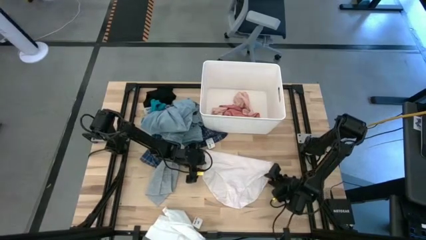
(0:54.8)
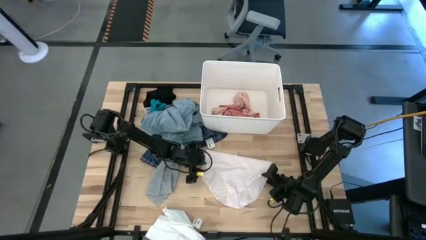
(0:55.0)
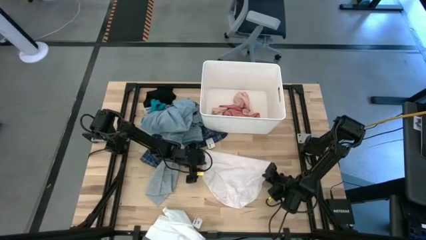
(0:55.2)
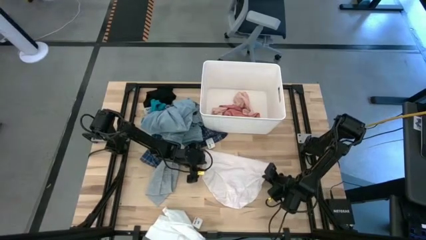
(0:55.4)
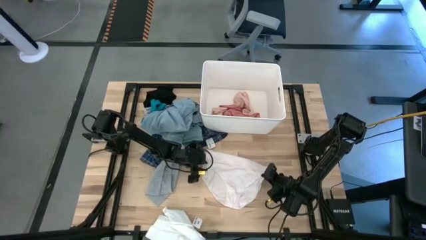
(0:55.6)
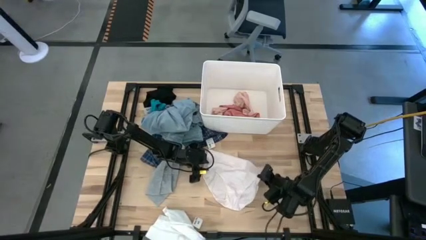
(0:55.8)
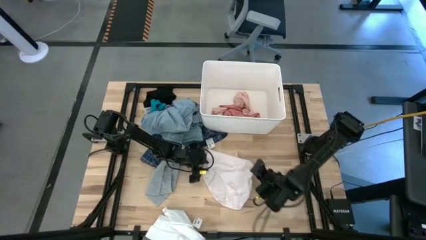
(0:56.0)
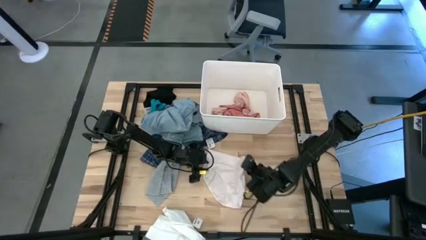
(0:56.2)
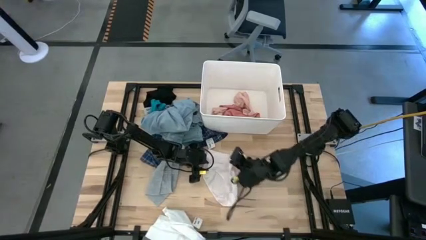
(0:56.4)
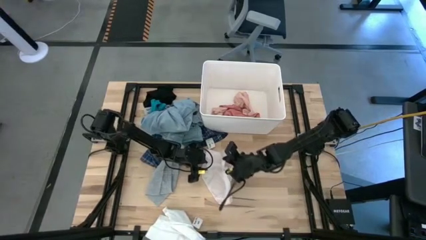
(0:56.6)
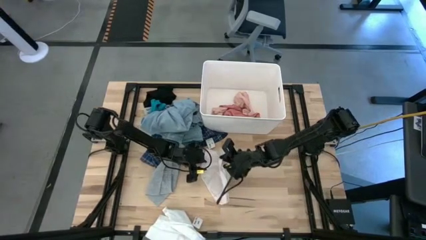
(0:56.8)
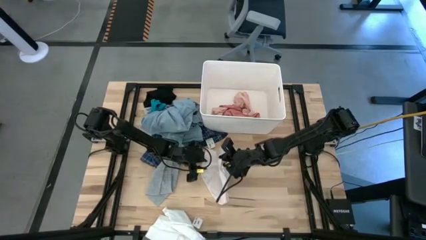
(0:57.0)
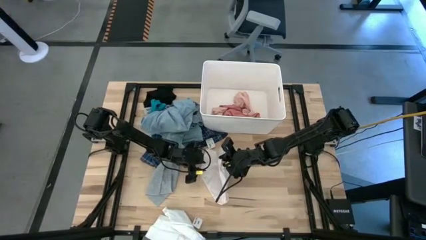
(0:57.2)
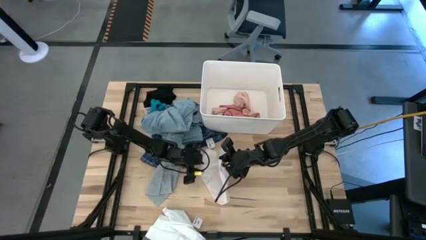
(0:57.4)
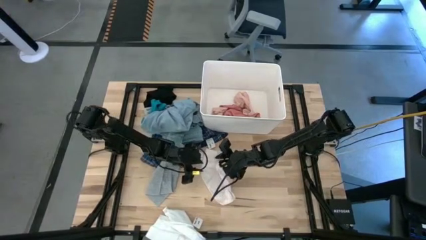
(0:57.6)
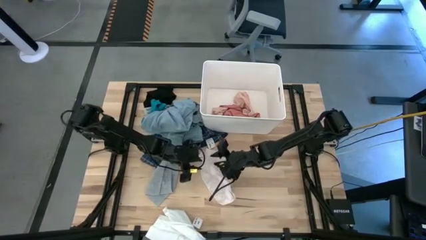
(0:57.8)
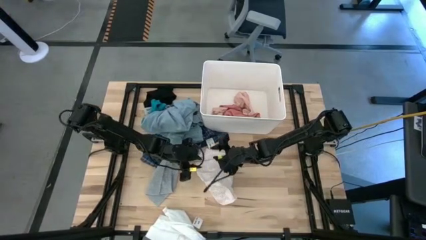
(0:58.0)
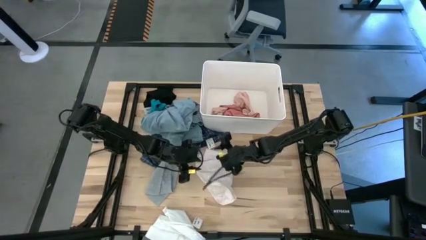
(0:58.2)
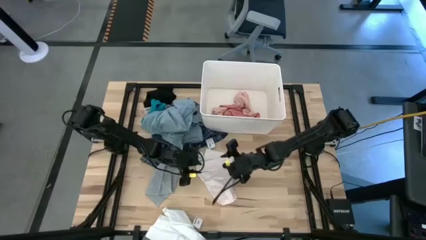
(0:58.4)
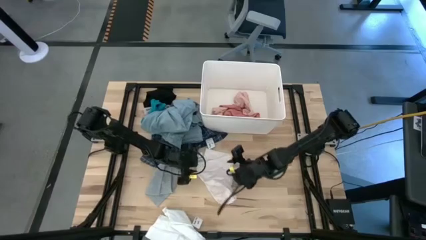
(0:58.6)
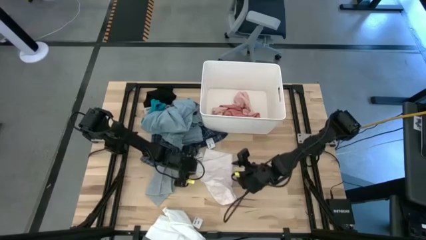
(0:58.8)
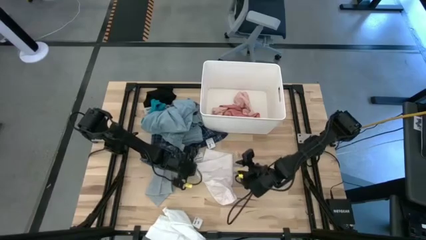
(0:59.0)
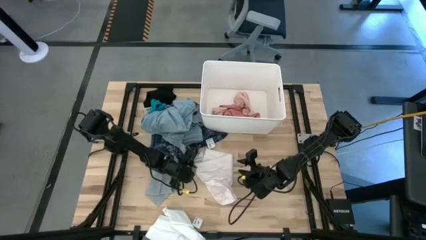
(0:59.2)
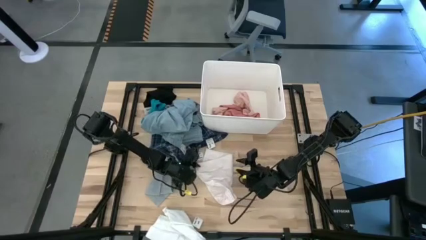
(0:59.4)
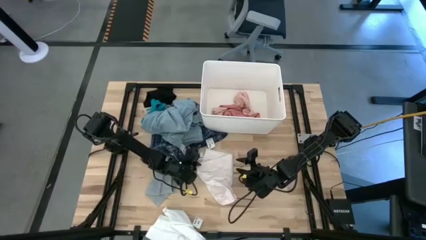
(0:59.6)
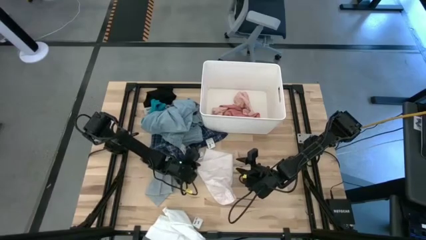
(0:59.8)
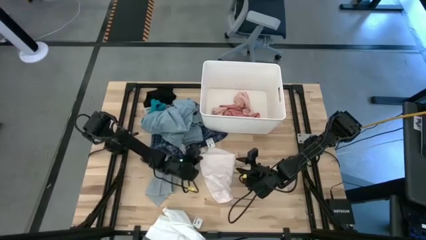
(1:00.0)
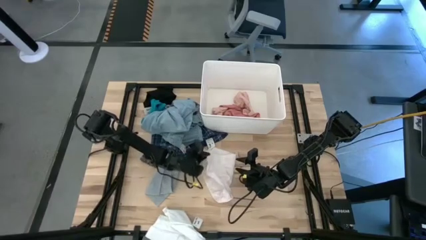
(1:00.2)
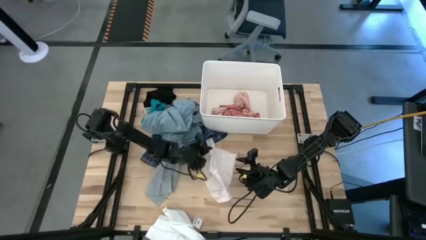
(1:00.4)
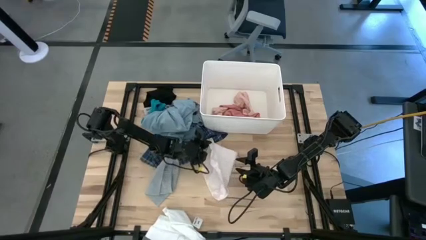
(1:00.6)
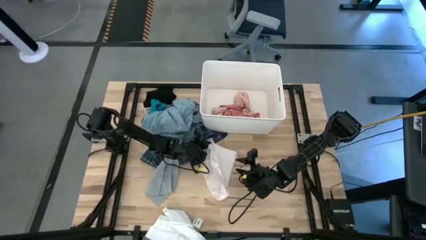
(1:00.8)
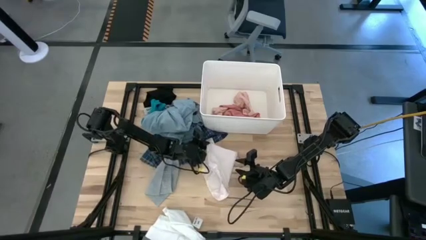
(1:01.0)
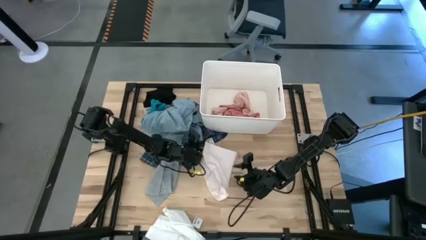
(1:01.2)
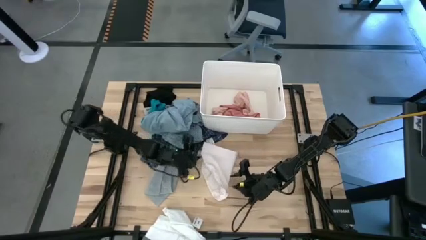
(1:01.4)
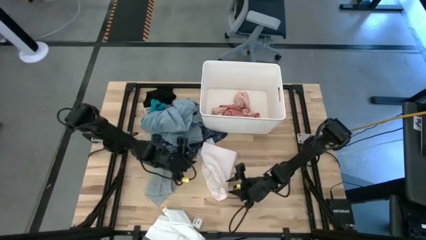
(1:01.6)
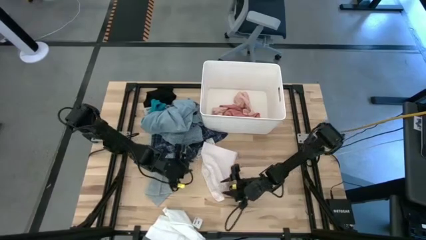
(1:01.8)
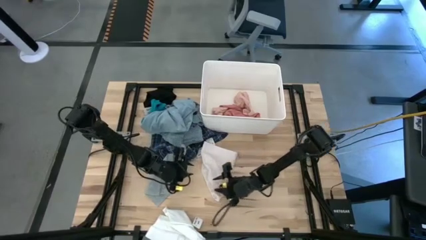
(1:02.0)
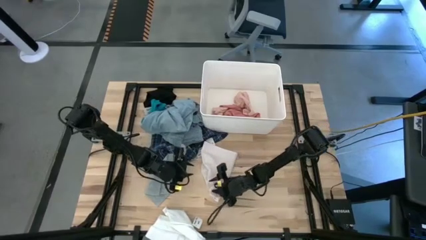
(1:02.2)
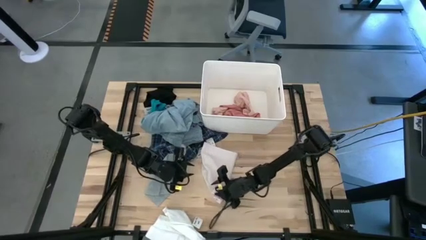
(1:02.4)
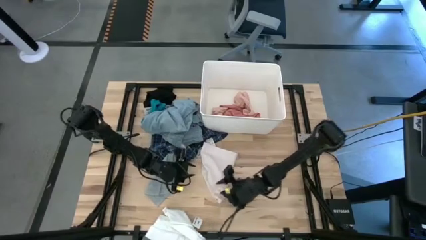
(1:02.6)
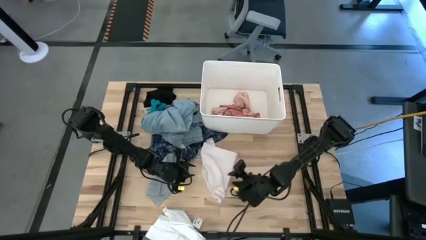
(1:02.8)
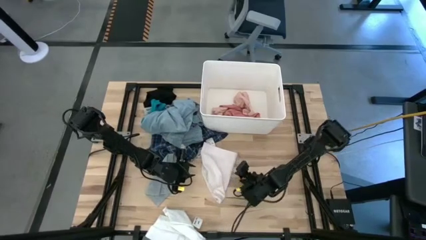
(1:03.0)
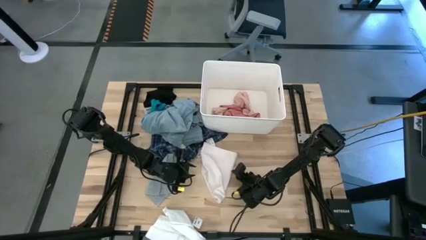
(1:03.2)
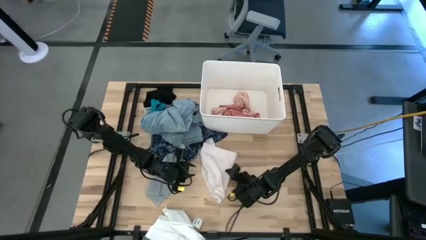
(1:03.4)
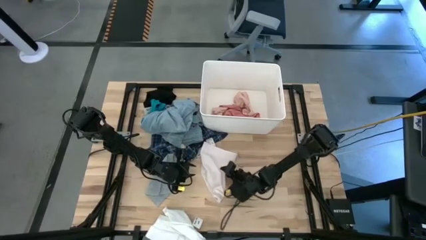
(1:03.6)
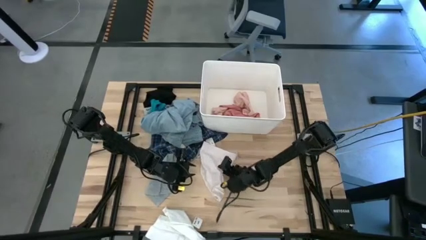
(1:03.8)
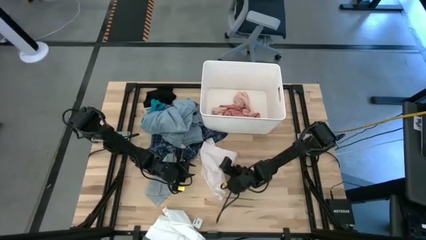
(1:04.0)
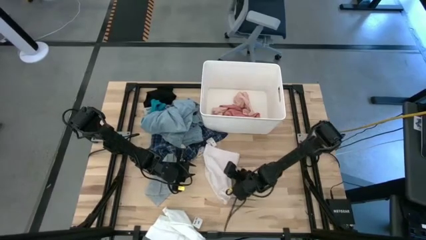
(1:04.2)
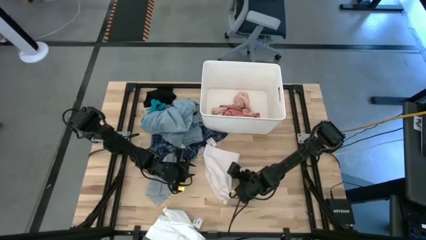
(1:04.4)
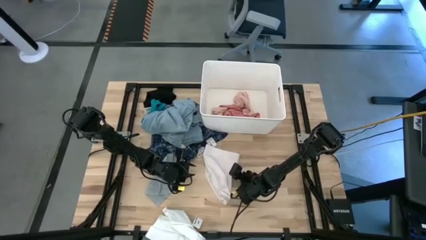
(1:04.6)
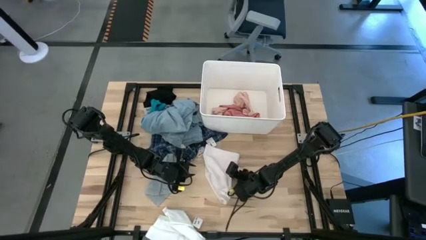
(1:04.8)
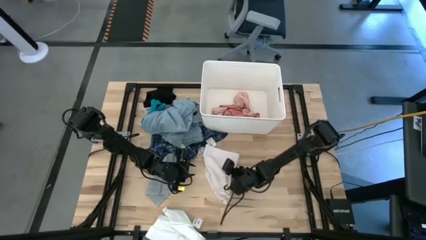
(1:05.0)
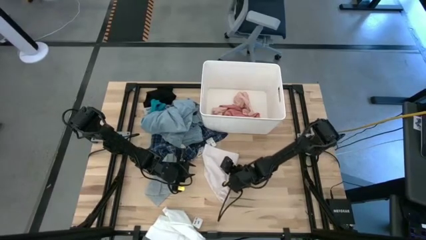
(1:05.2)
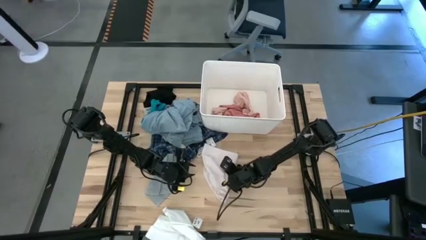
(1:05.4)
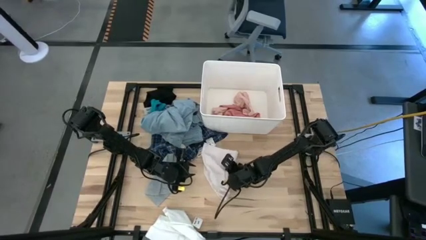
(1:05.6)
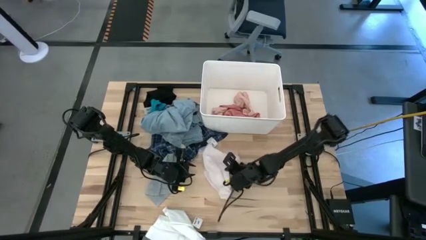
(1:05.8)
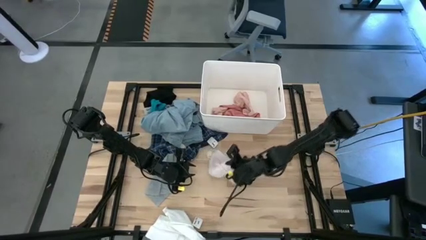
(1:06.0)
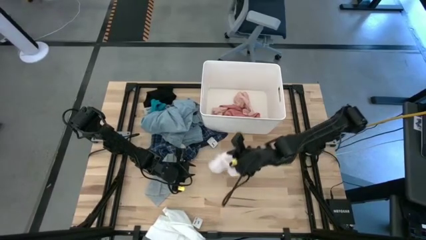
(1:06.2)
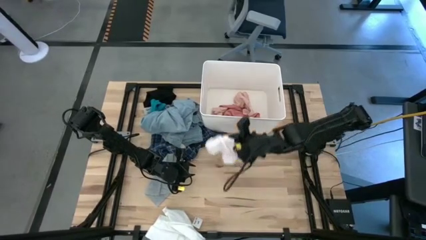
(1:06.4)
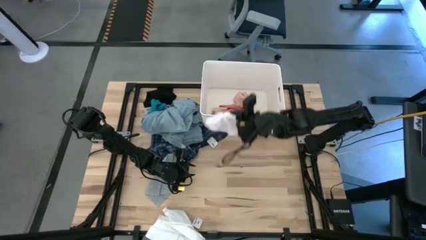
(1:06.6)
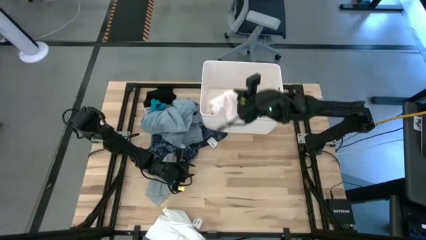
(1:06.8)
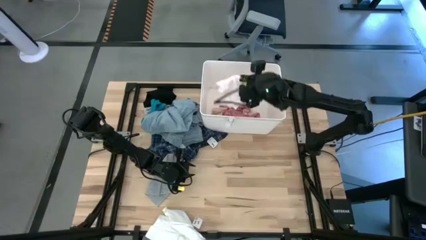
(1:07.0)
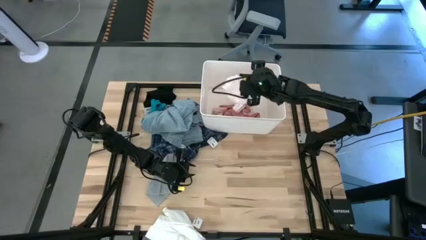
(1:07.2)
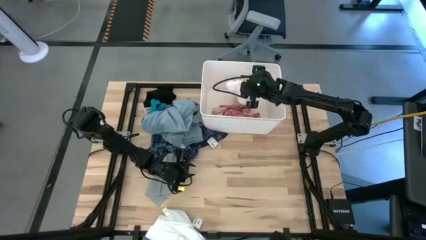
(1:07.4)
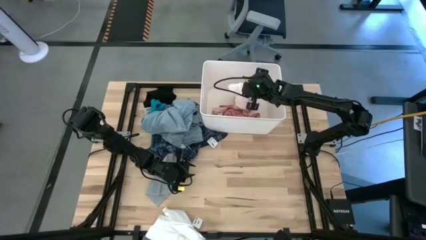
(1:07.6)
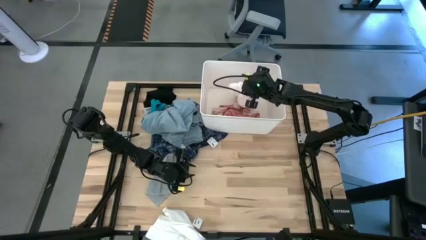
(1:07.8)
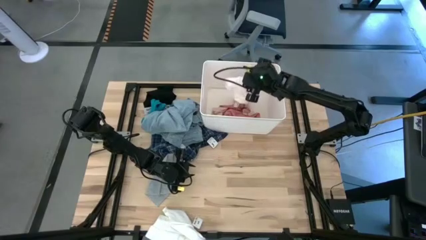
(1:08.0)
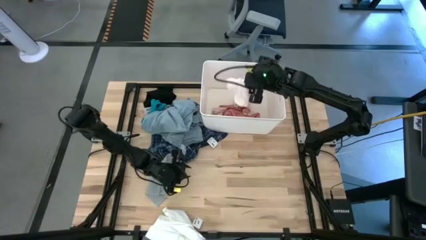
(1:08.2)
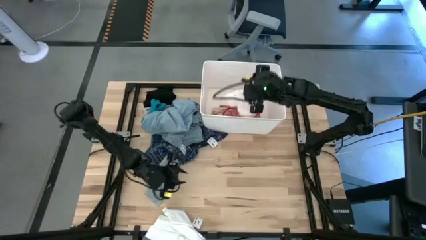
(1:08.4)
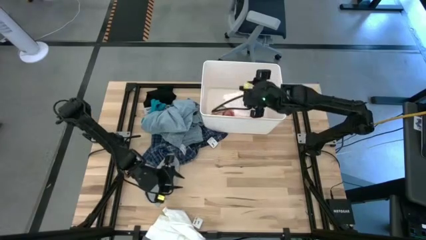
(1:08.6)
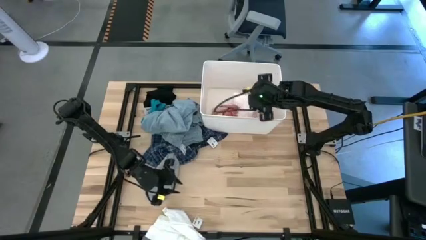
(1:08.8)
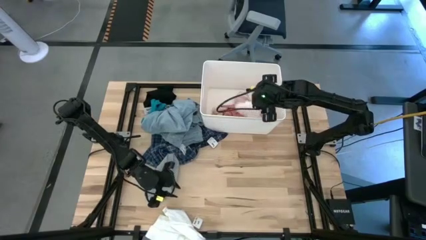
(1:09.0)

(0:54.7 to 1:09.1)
Task: Sort clothes
Put the white underwear into the white laundry bin

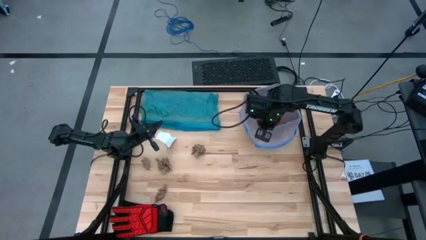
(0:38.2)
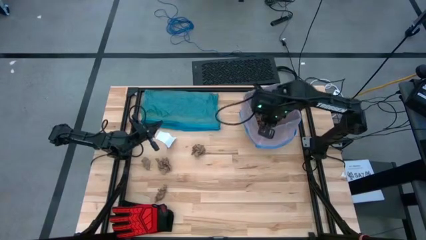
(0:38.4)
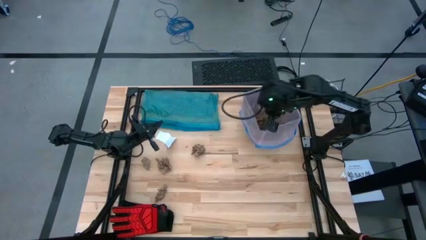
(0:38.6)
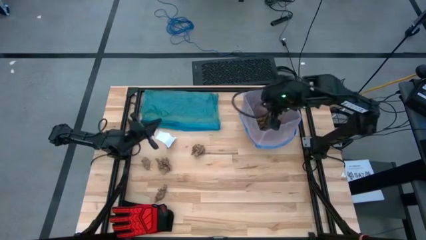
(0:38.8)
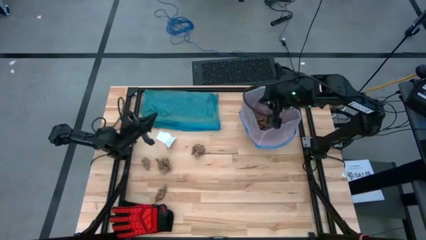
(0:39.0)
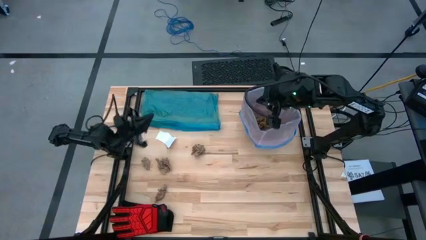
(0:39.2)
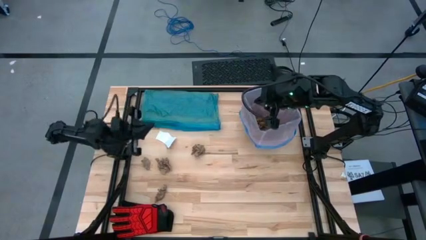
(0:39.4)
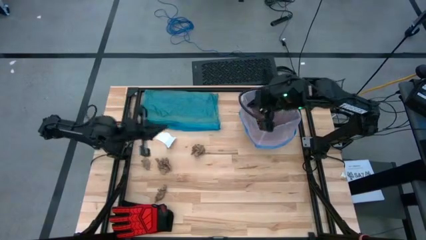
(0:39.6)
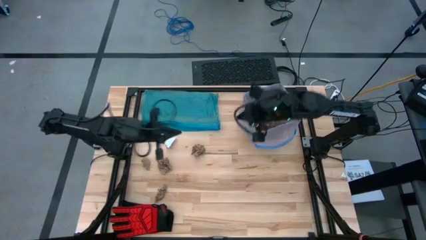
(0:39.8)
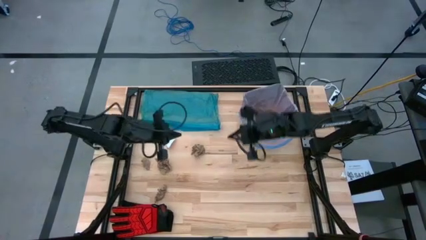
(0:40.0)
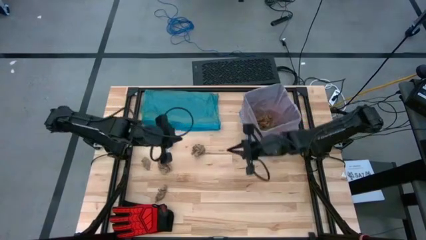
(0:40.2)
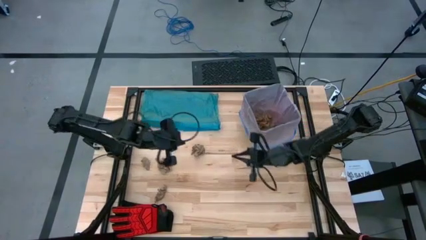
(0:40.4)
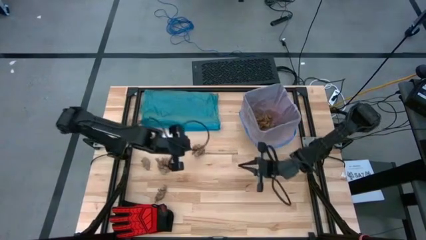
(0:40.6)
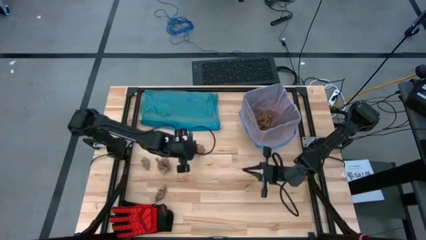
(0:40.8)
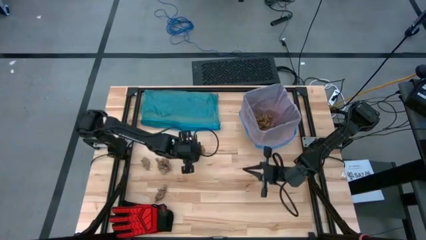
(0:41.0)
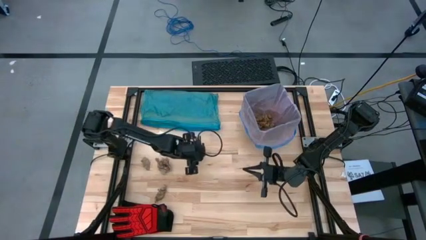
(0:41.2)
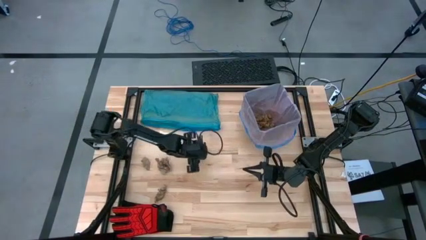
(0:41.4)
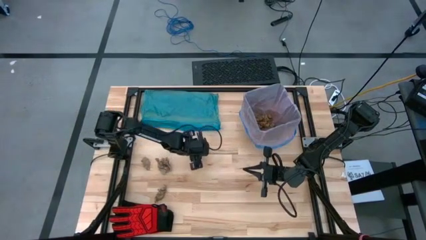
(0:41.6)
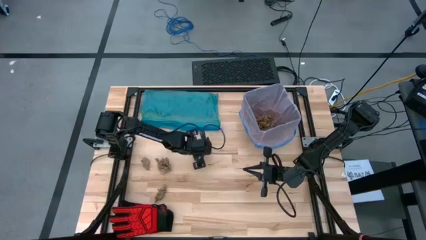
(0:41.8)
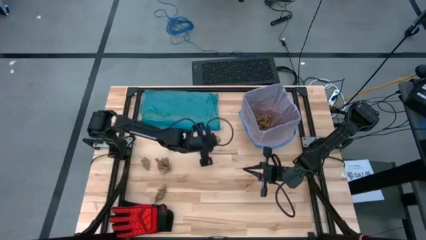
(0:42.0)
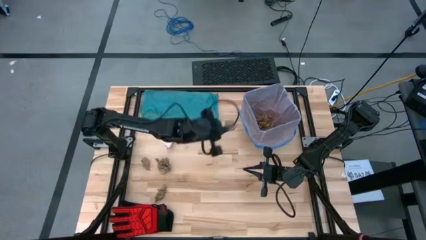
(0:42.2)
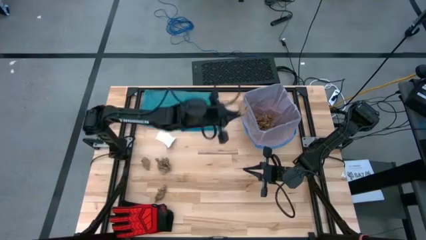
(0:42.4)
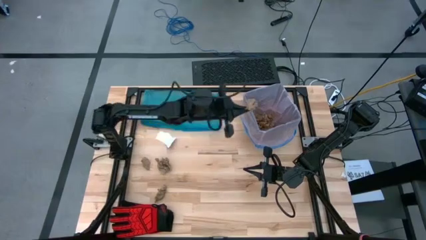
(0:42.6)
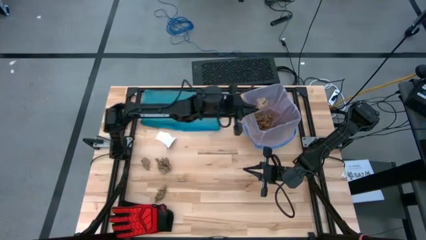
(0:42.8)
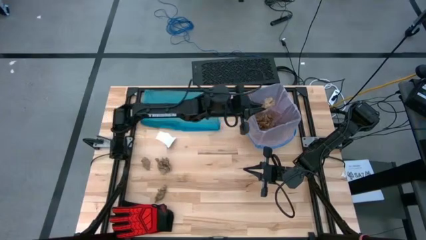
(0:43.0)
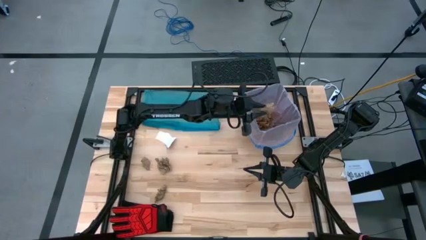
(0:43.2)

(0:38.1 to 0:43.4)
Task: place trash/remove bag and relplace
Put the brown napkin into the trash bin
